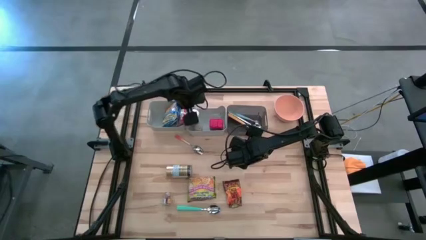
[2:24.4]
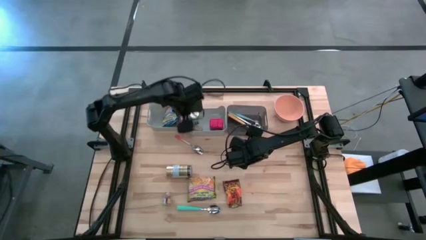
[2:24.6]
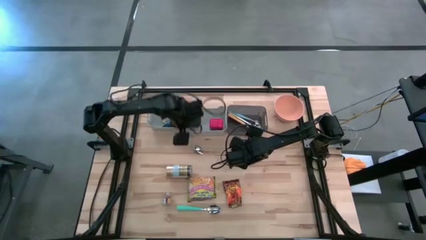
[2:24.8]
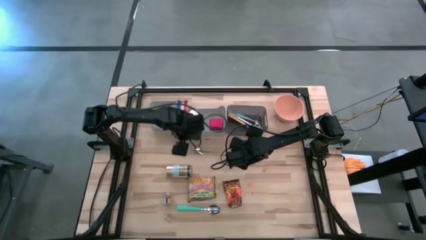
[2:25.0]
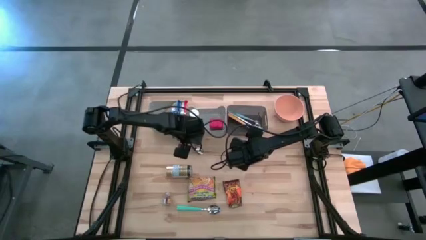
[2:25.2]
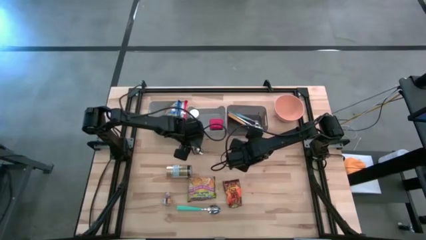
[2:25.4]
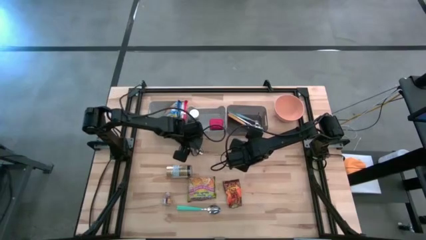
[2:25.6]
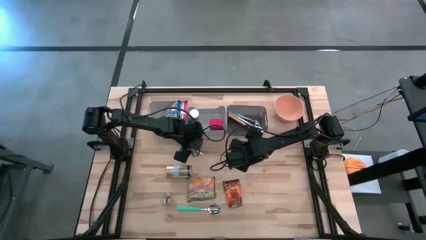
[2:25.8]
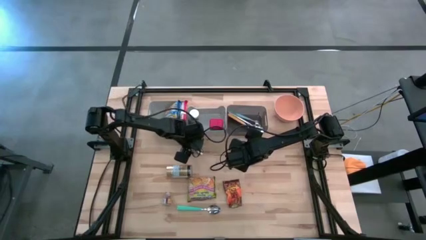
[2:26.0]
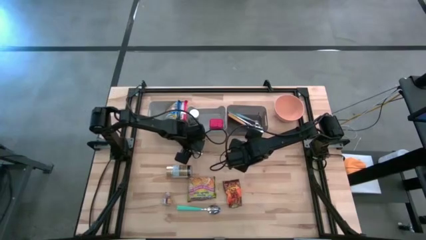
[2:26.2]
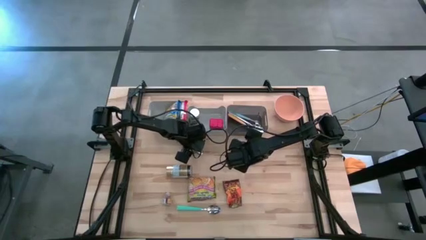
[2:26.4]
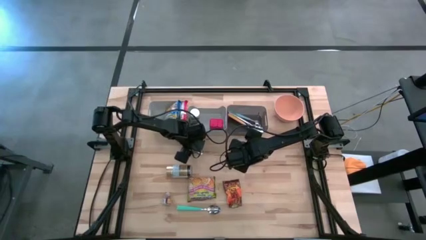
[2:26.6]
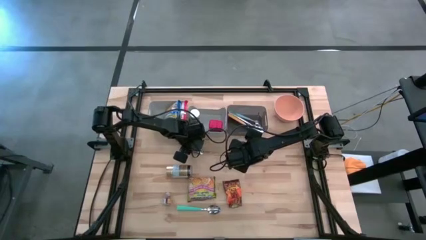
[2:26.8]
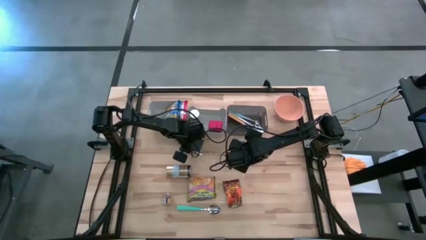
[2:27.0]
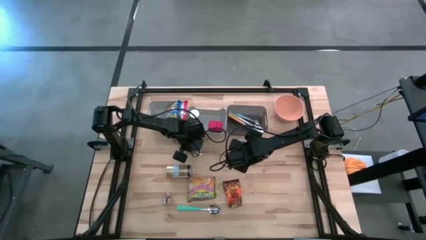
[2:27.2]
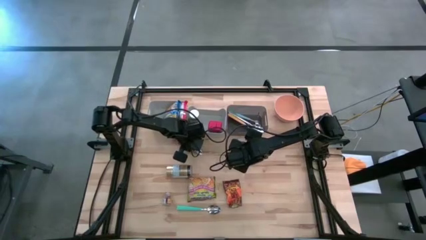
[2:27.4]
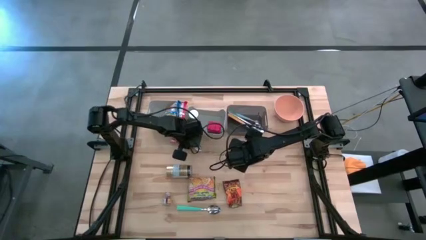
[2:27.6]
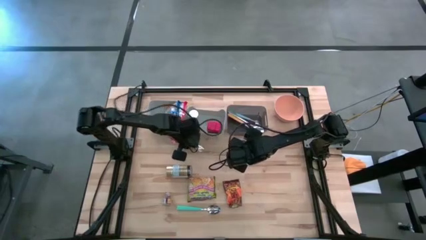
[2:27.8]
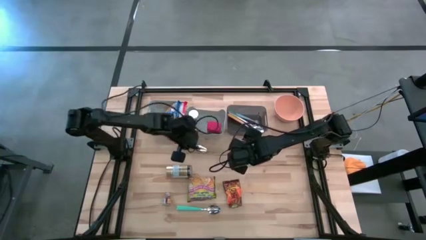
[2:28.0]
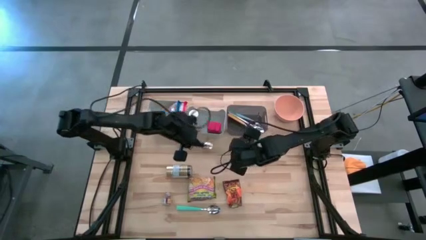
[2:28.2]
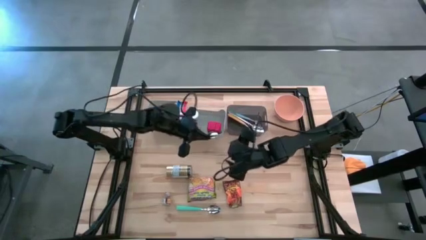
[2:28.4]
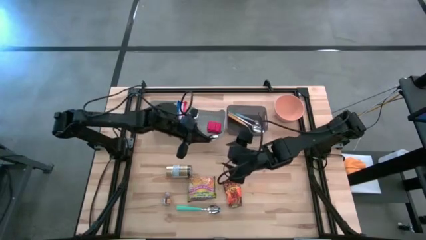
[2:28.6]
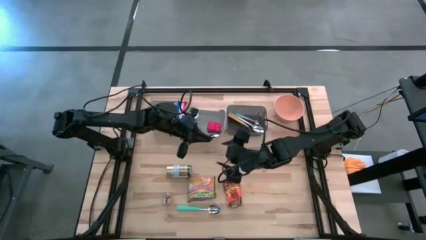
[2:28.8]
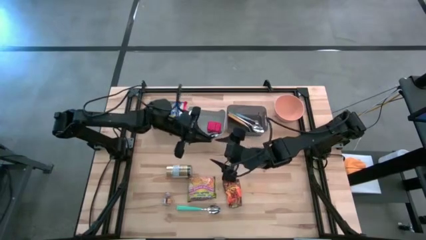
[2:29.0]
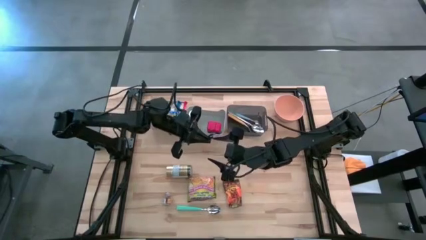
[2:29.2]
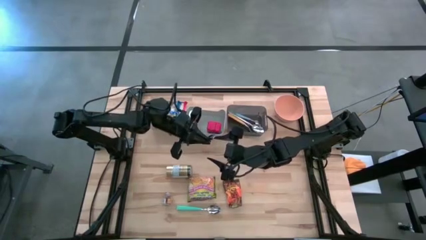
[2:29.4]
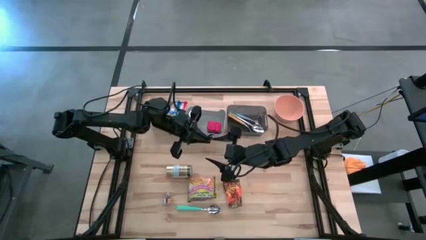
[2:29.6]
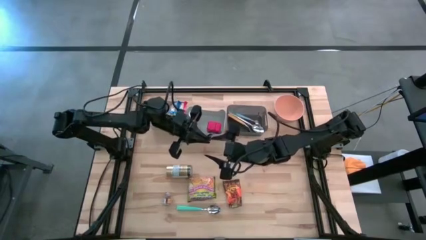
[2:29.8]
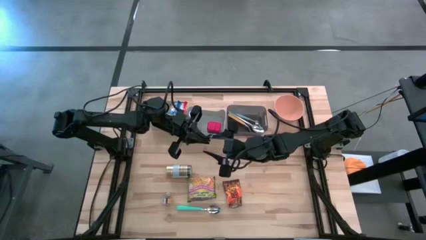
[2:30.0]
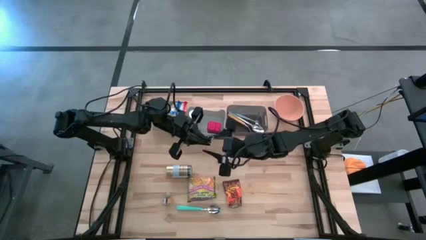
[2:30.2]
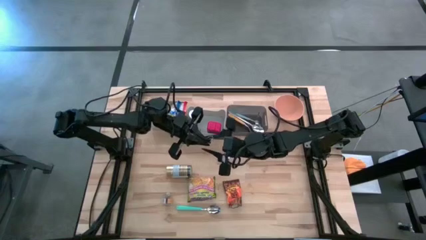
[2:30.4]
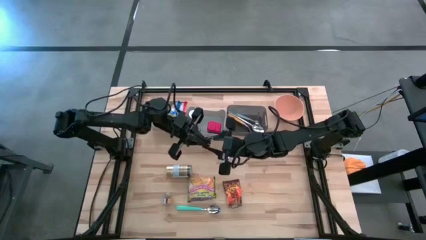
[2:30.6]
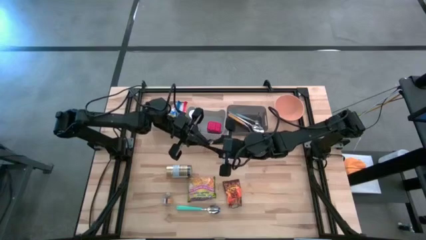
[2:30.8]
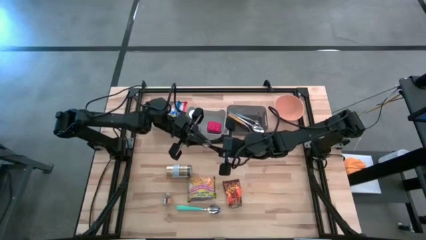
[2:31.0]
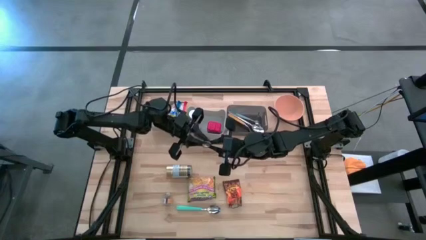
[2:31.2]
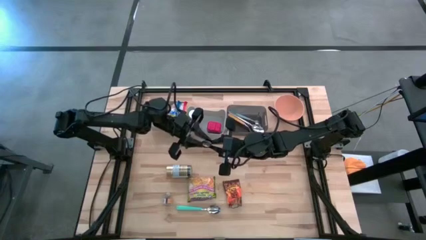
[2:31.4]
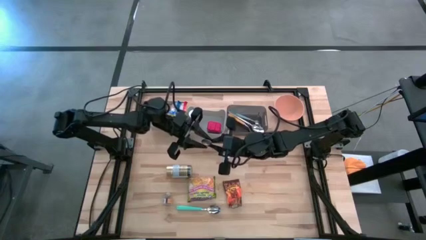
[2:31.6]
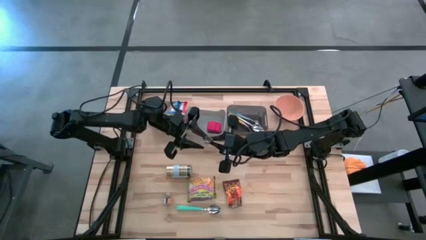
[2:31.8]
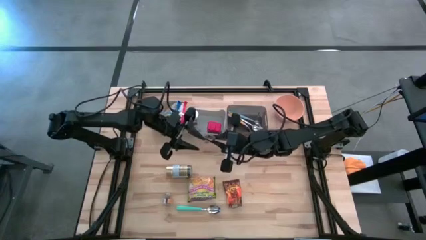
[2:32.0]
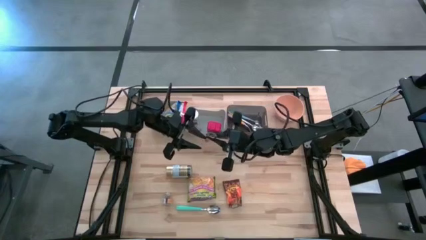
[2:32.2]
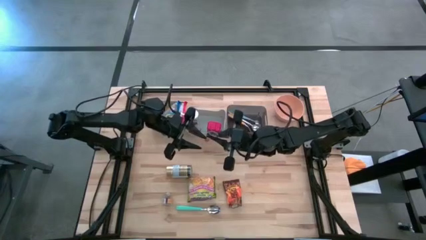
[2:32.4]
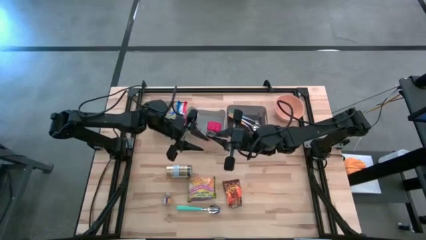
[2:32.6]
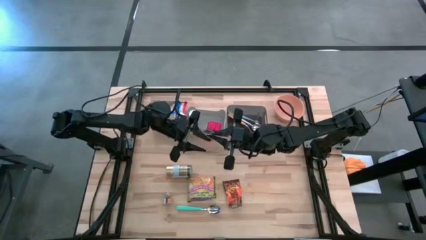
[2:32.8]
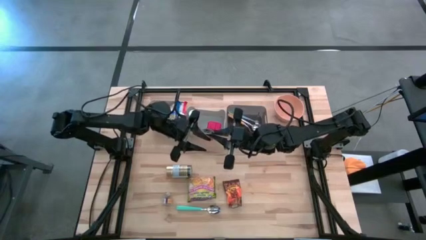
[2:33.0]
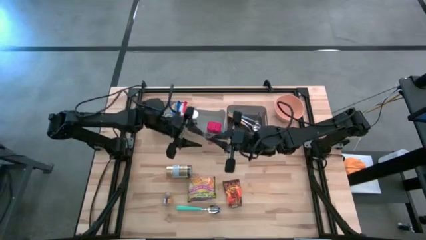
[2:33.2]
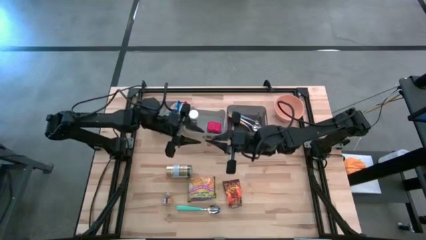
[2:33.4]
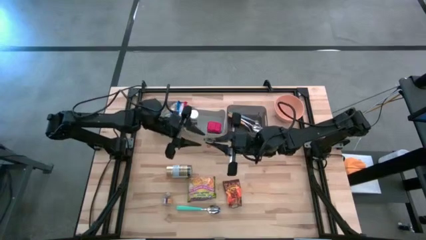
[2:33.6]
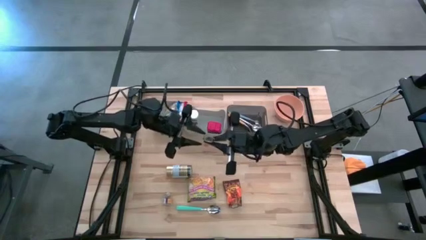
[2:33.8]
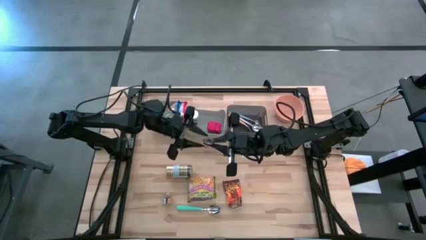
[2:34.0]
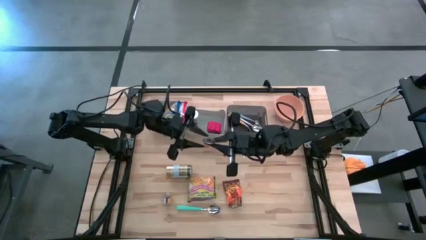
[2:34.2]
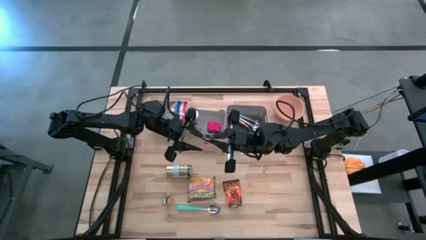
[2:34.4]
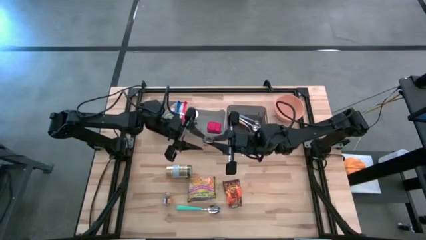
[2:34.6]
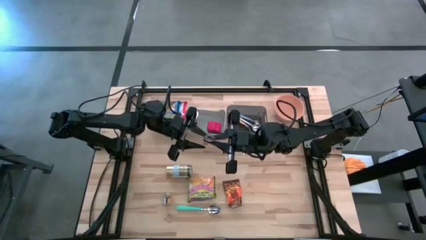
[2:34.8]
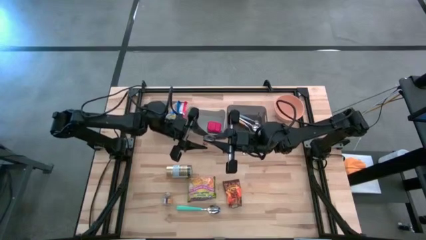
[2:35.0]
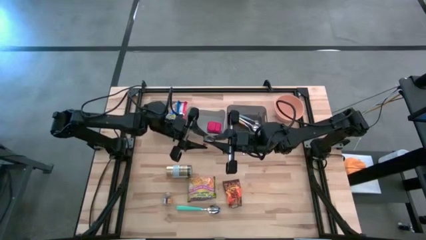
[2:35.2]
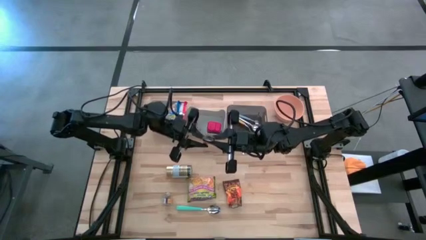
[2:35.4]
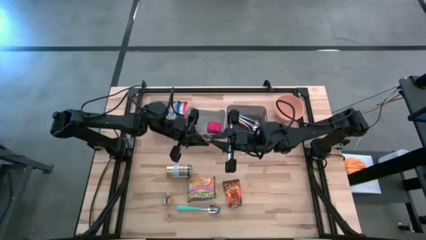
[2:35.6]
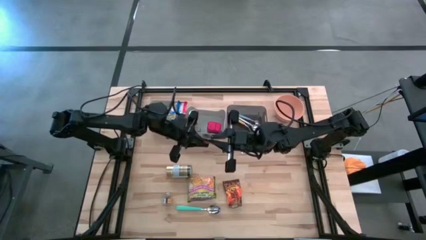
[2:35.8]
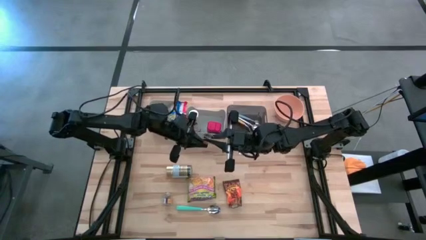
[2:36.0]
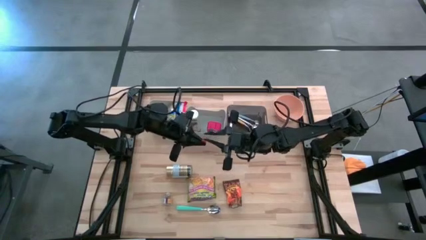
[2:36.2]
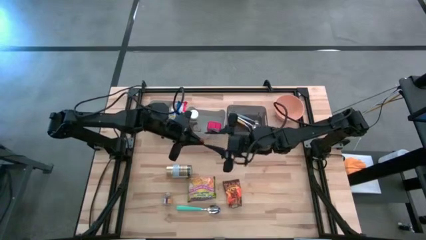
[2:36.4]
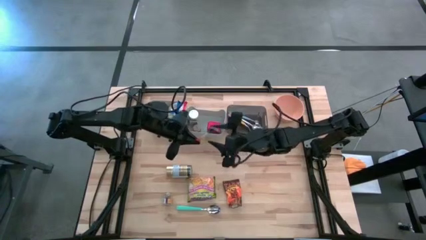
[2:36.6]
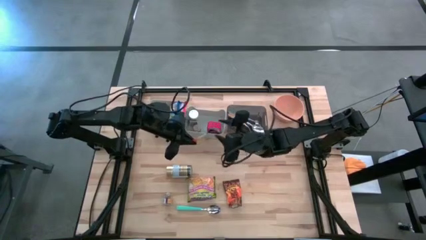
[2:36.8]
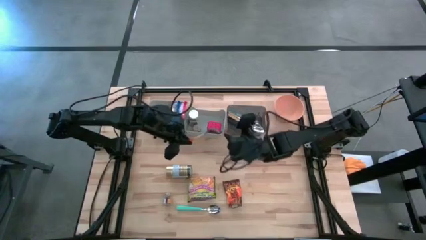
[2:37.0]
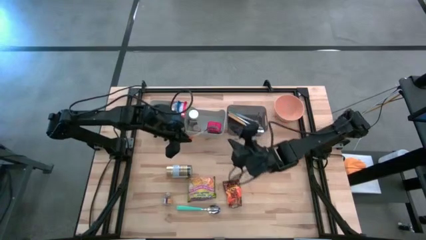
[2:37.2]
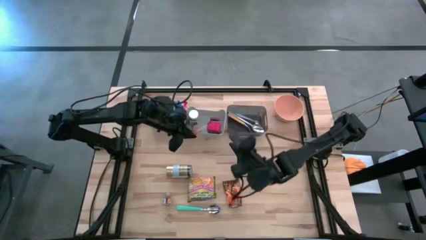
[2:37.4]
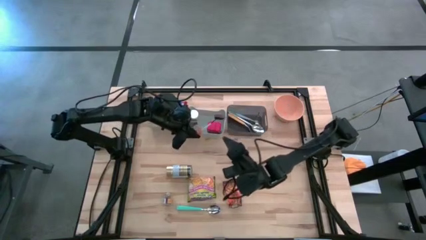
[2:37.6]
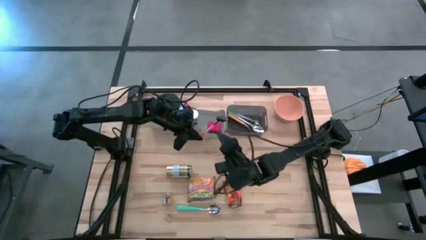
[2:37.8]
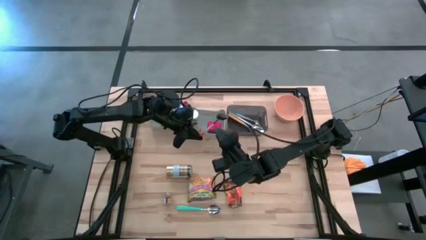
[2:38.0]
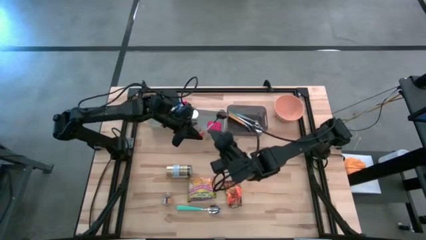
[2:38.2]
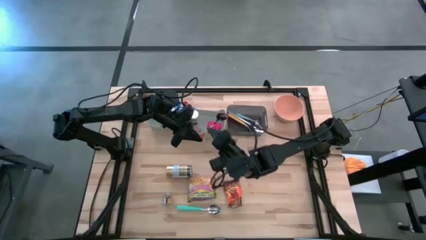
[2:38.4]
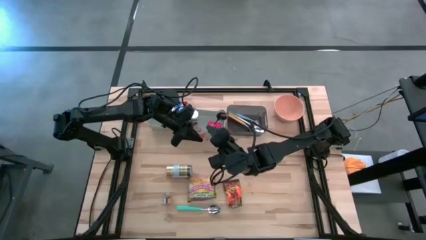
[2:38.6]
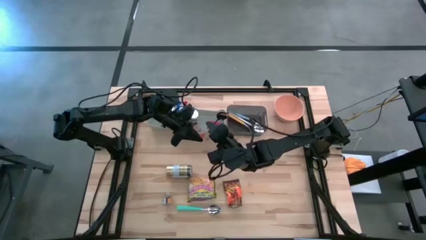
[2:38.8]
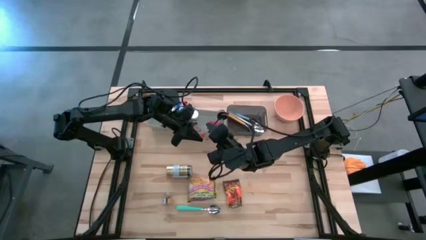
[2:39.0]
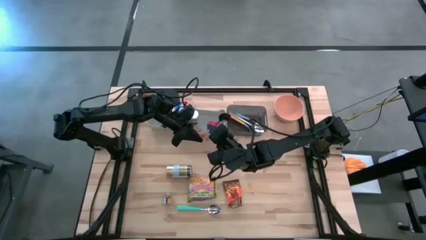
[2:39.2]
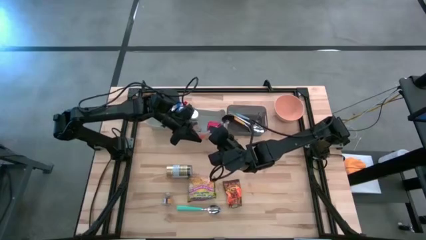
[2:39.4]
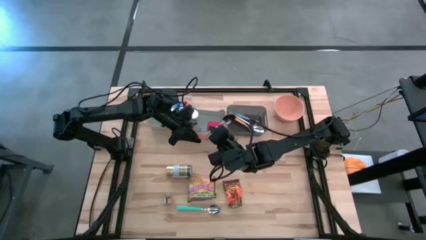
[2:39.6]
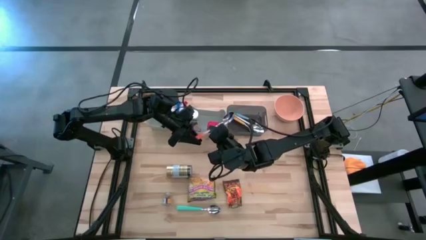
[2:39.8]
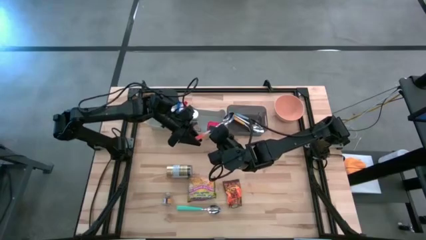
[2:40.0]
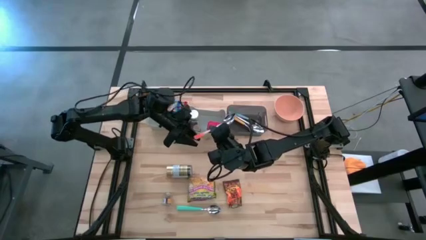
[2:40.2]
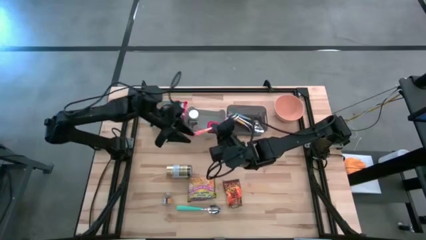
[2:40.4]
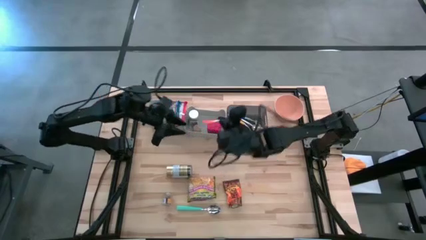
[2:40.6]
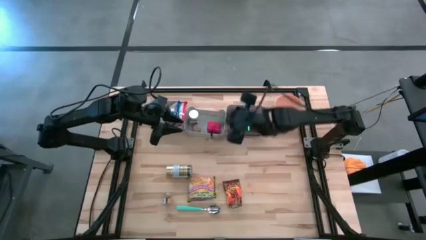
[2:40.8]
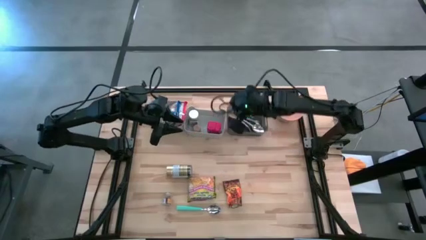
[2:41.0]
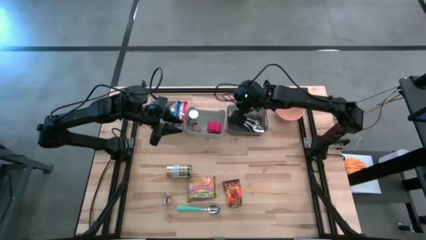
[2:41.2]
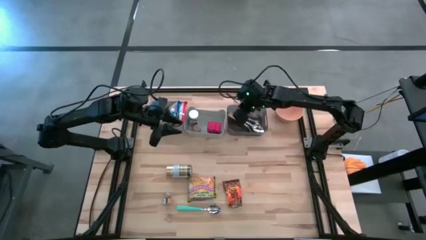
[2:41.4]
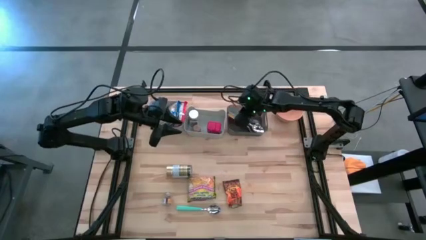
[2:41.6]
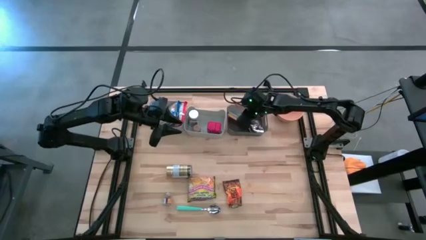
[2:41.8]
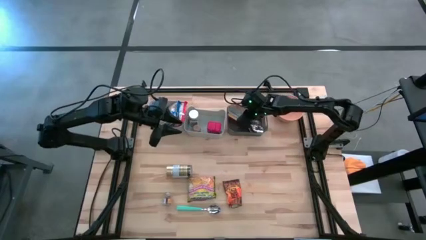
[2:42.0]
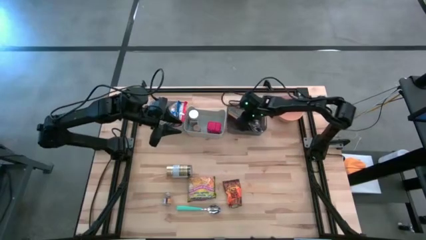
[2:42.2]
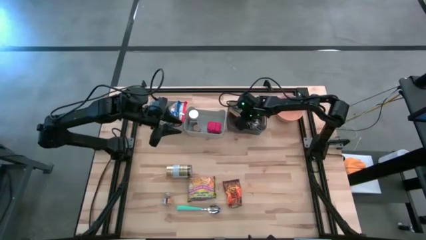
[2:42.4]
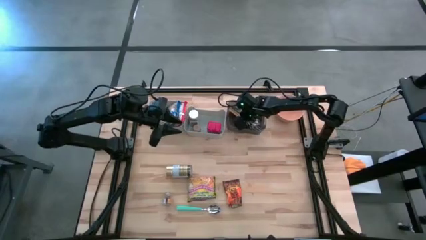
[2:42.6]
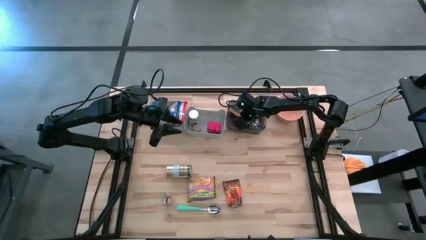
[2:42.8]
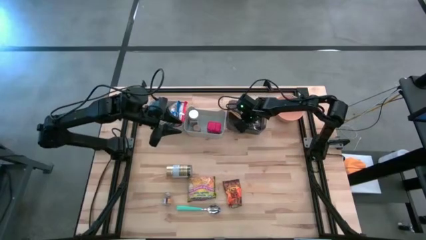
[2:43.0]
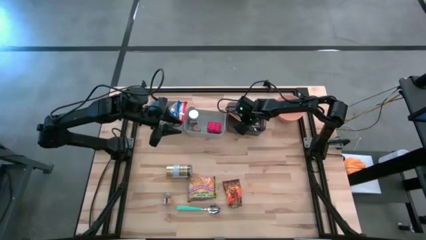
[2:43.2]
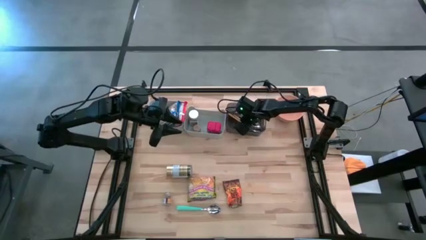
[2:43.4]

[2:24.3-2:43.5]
Put the orange spoon into the black bin
